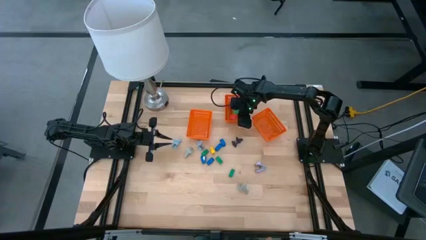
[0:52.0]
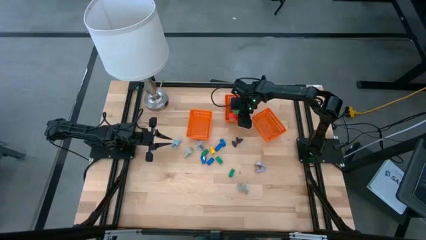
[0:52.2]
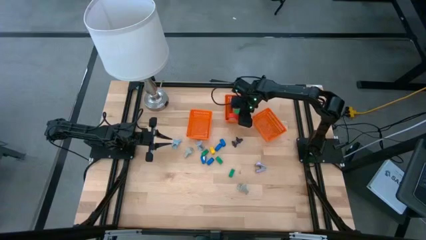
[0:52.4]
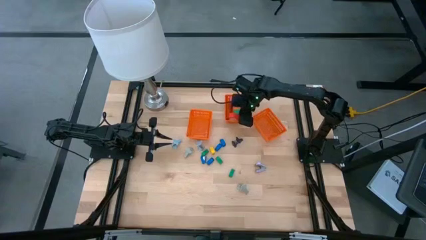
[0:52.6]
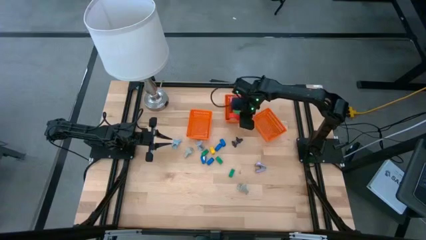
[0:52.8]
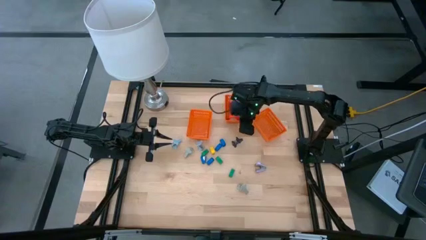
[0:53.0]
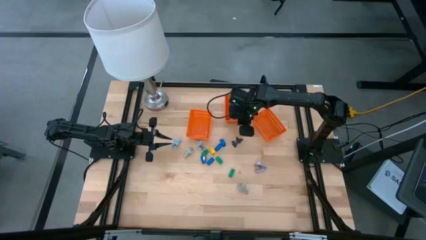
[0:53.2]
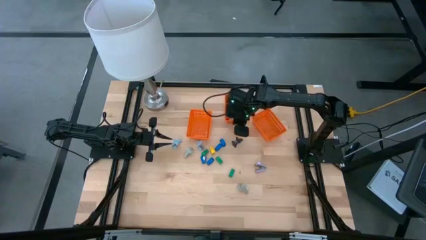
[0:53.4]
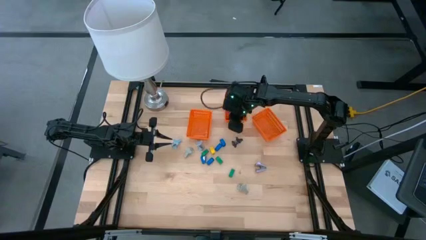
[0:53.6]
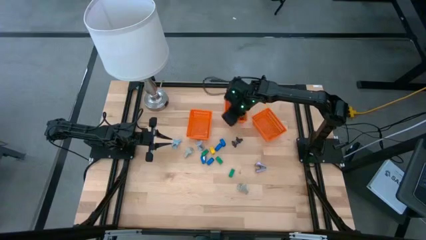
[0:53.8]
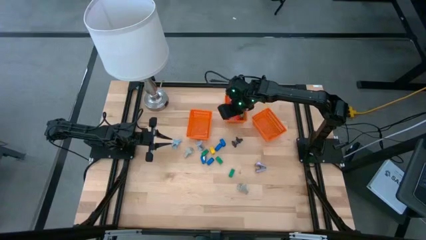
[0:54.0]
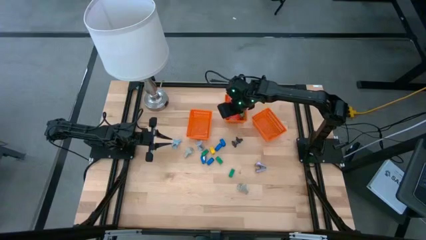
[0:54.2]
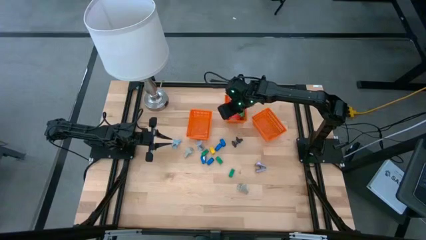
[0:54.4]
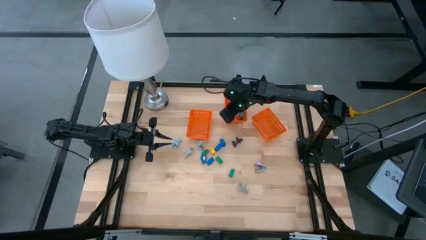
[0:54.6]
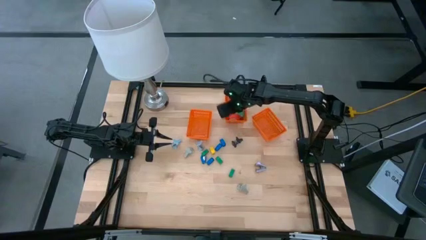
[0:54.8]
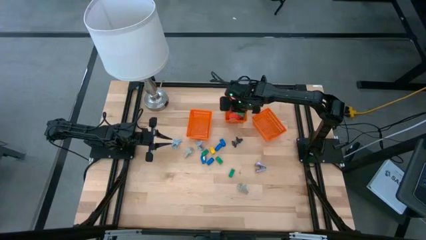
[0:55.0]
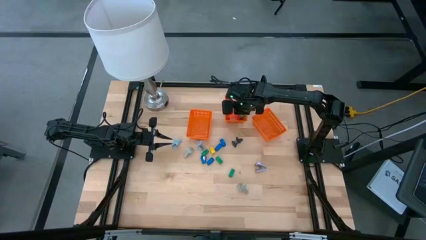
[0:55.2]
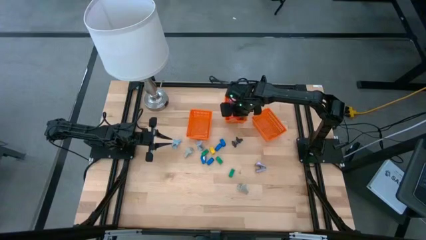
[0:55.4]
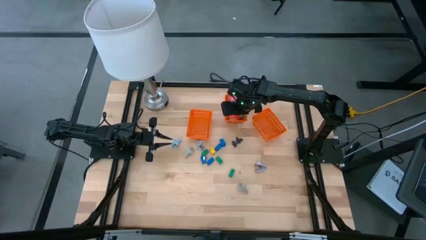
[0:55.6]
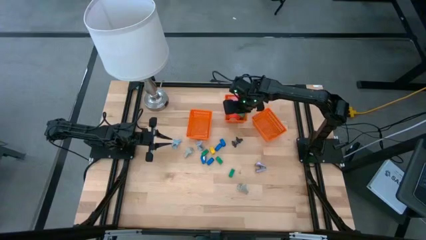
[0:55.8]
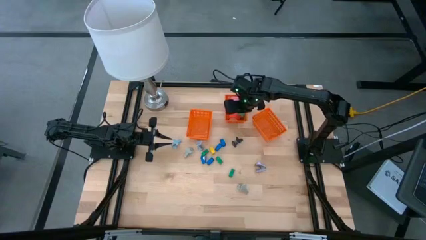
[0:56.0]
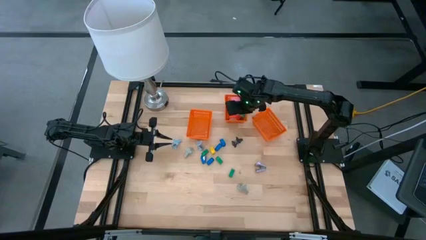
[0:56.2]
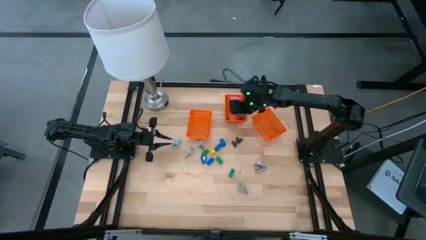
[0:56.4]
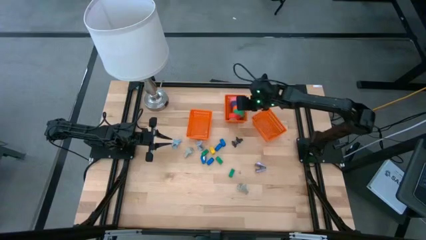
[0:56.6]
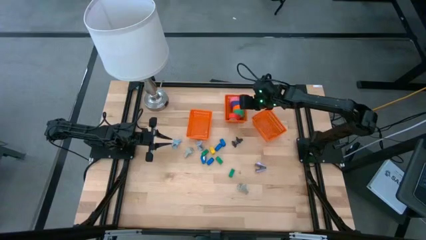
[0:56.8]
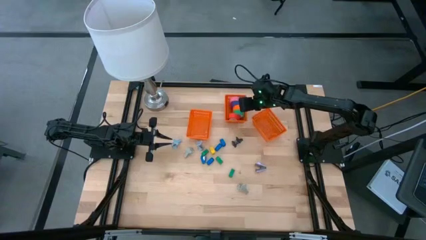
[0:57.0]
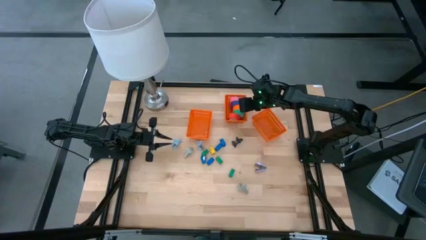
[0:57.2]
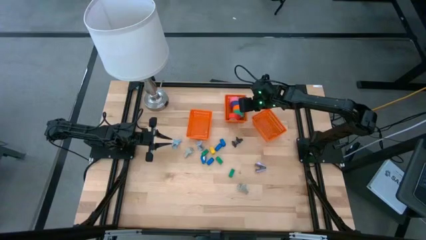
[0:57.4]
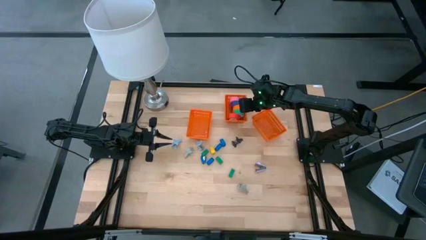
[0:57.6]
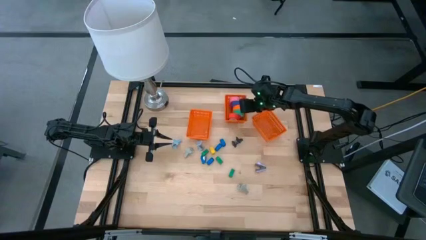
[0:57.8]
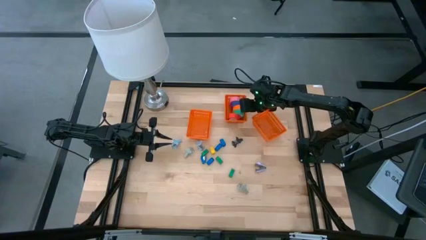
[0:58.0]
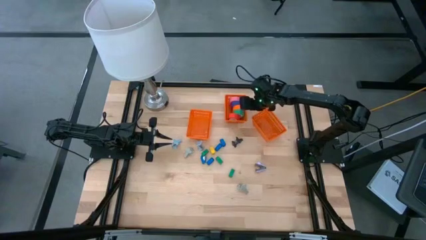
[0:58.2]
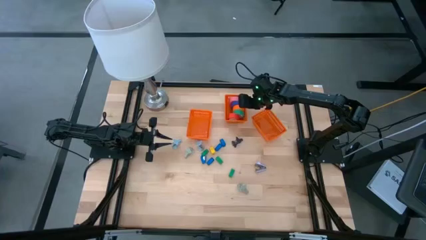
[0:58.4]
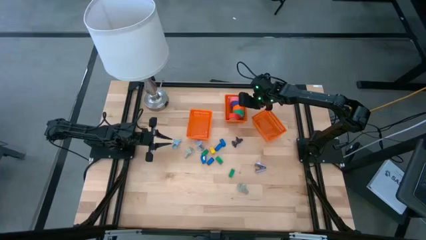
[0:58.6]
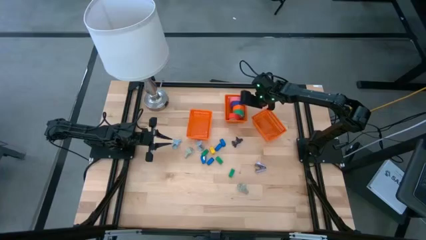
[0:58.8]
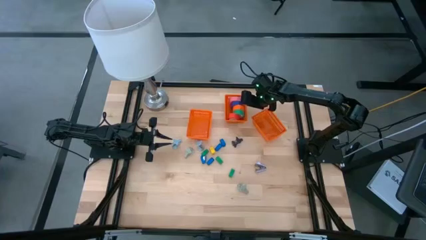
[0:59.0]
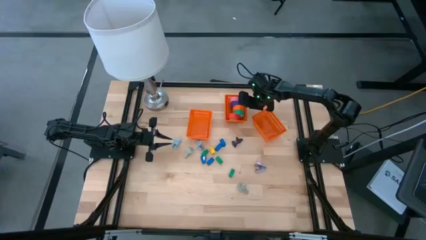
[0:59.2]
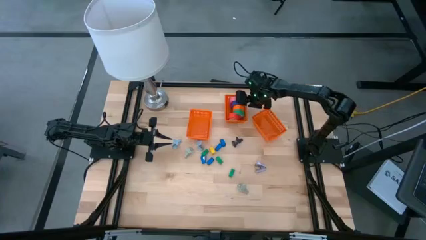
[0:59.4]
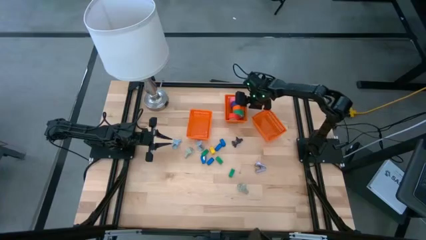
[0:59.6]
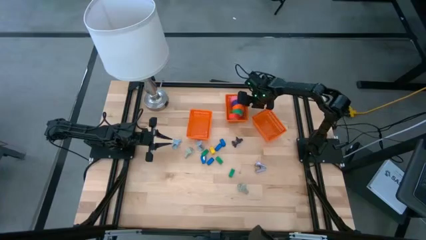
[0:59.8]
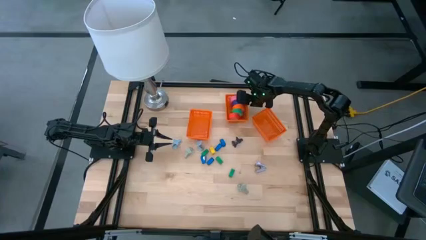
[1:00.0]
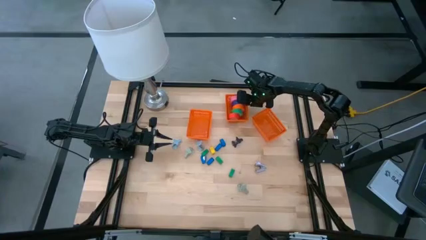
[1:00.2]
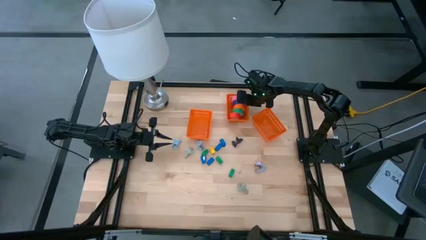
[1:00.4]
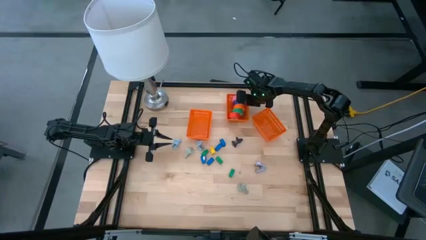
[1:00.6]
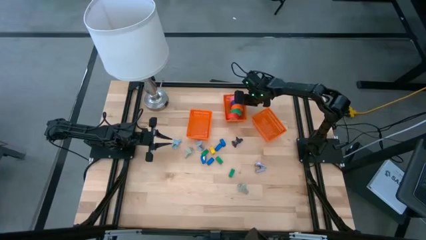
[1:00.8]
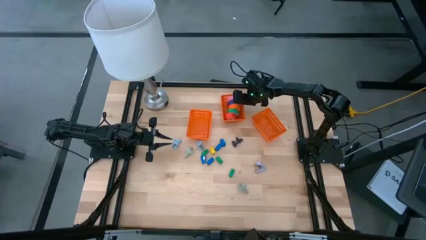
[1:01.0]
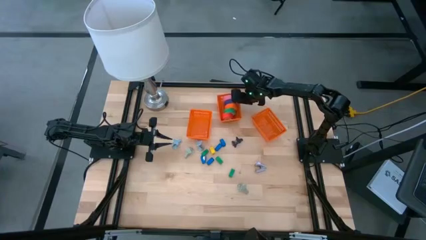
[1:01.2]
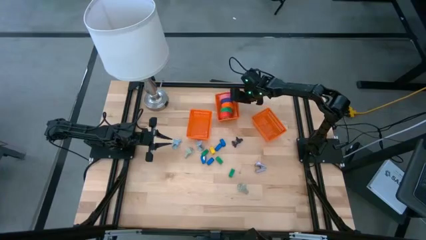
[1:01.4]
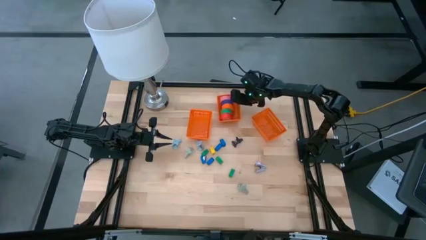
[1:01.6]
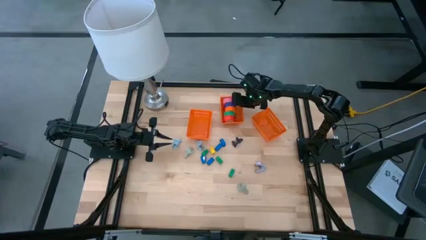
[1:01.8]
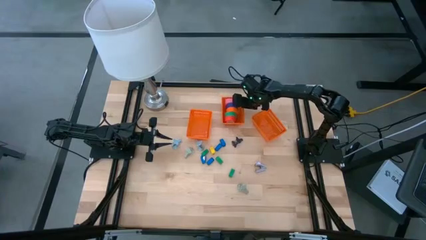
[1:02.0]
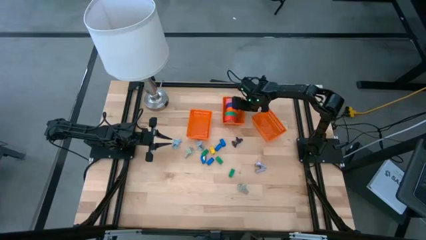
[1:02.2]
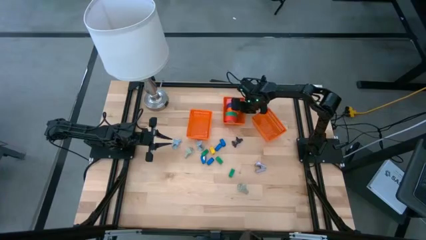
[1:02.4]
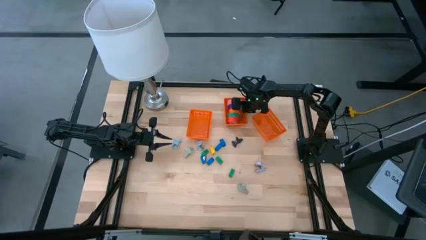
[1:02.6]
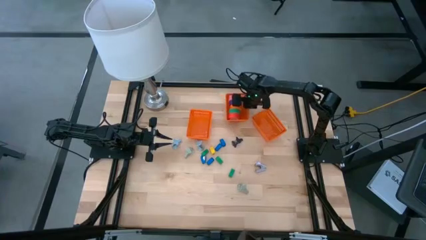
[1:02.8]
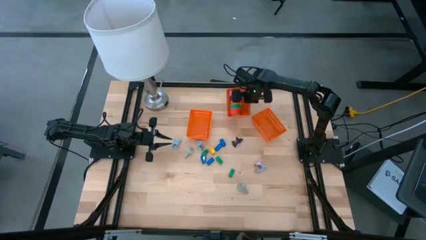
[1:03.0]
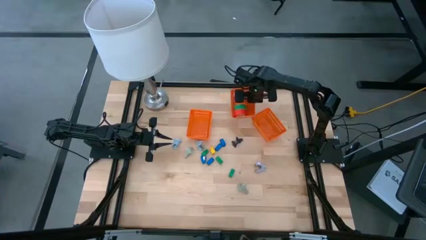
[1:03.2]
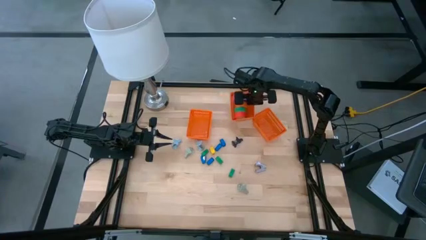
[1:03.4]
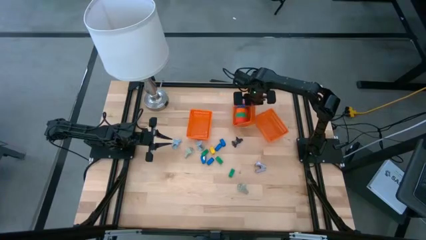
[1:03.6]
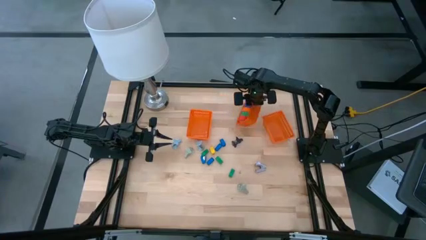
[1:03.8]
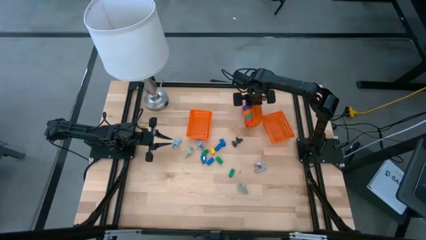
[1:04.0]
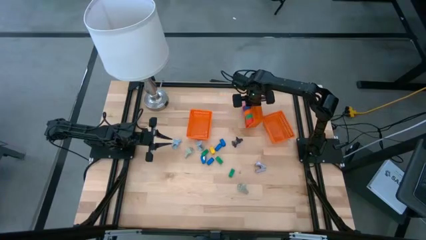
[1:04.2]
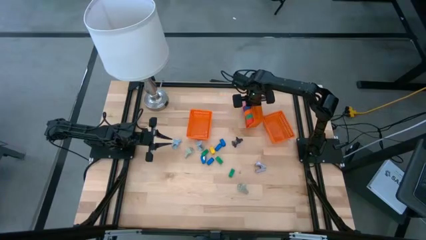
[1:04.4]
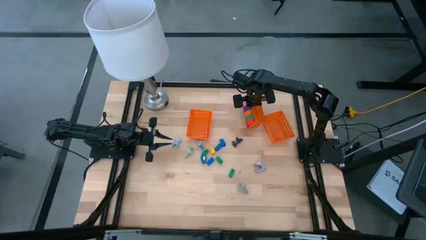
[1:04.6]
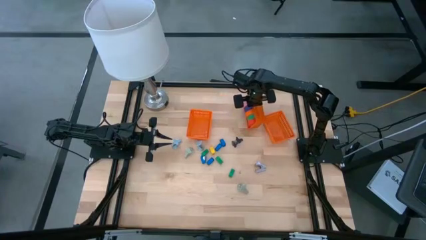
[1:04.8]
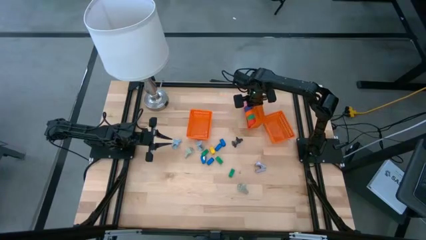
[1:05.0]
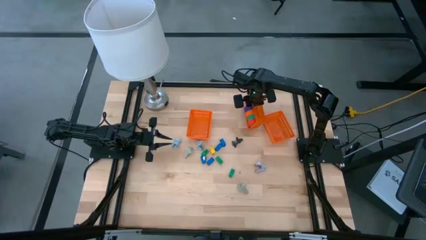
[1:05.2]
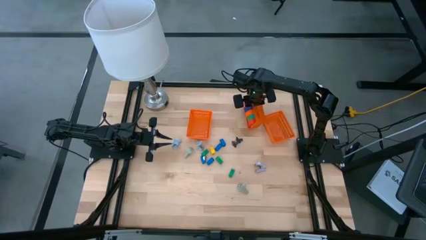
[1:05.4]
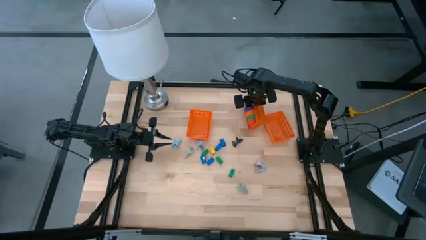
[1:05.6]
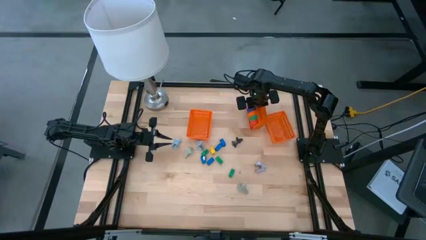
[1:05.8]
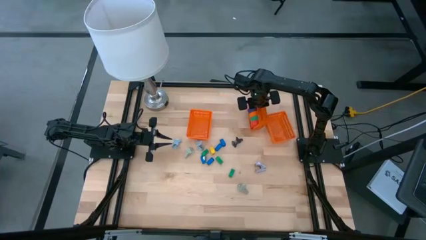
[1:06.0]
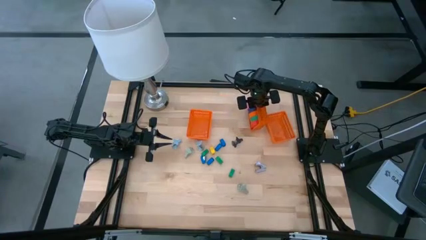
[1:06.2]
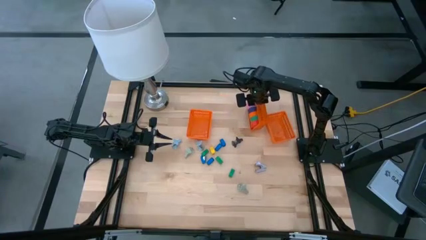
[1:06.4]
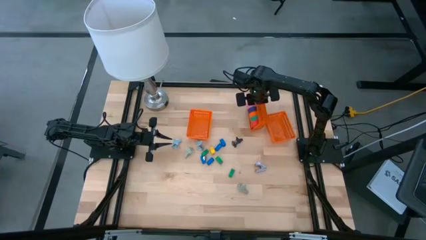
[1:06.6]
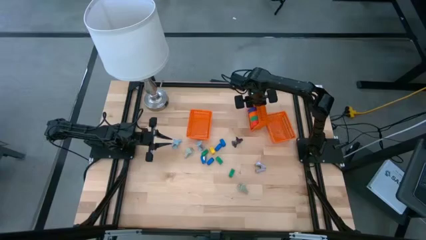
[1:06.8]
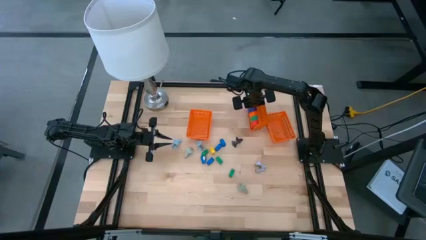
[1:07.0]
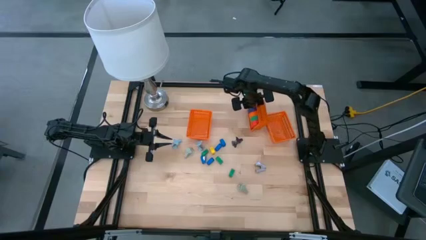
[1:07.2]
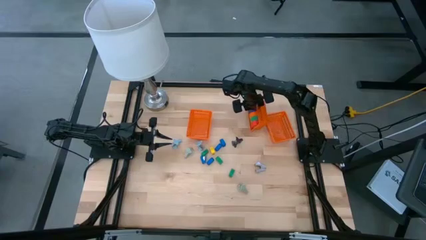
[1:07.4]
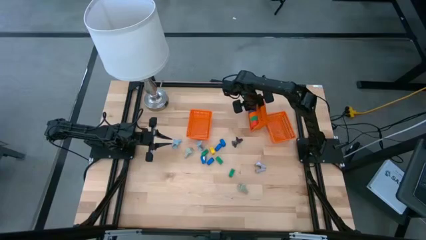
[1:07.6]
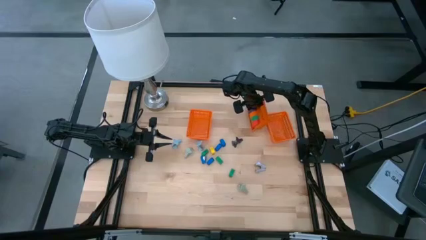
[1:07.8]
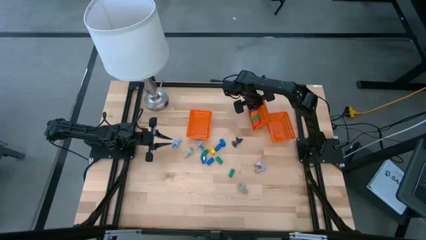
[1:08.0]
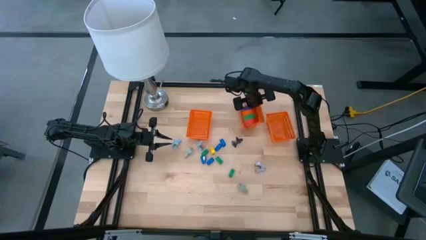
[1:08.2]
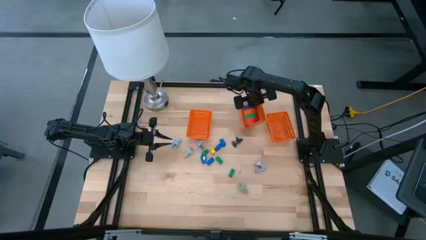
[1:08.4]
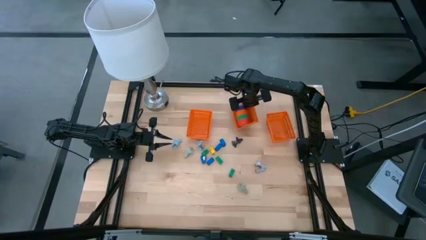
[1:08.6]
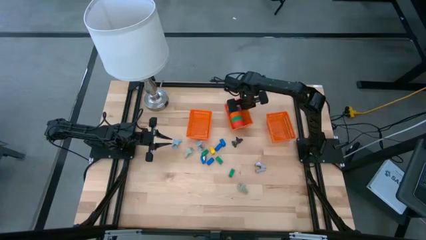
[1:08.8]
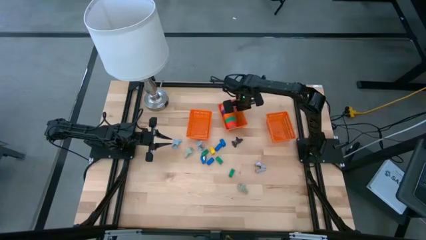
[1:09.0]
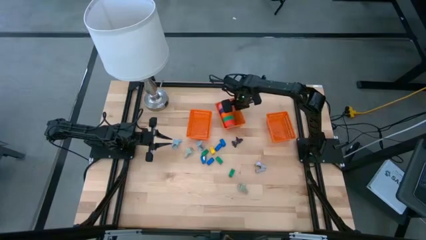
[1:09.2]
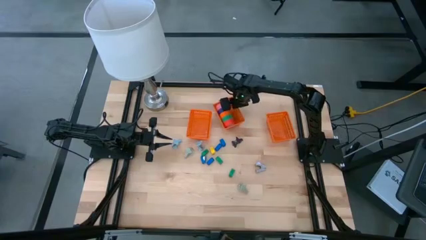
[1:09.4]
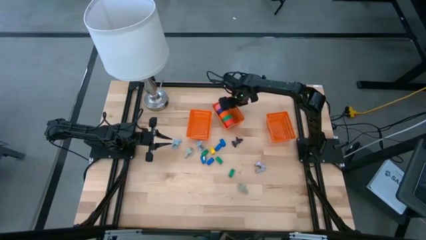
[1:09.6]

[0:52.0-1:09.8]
Task: Pick and place Stapler, Stapler remover, tape
Move the middle orange bin to the top center of the table
